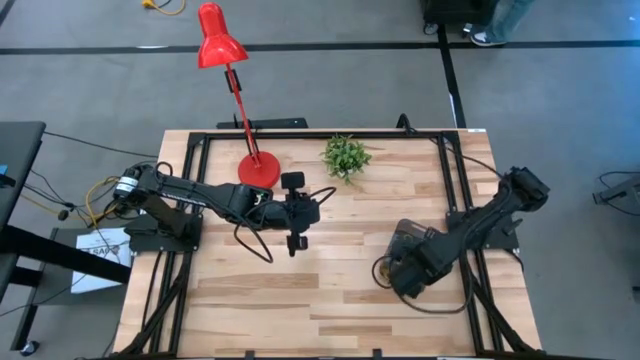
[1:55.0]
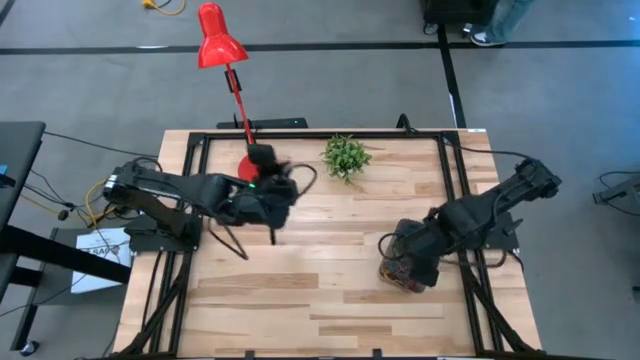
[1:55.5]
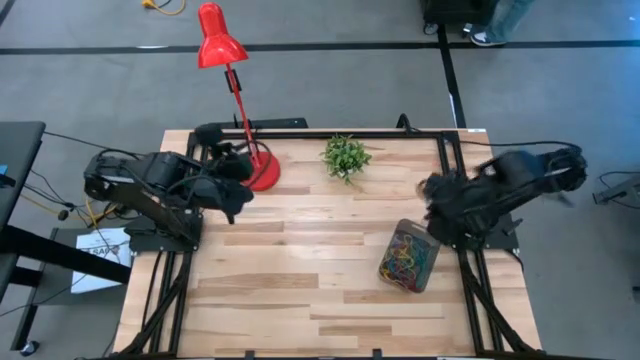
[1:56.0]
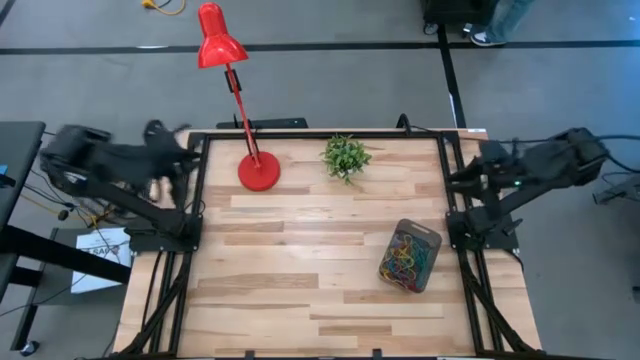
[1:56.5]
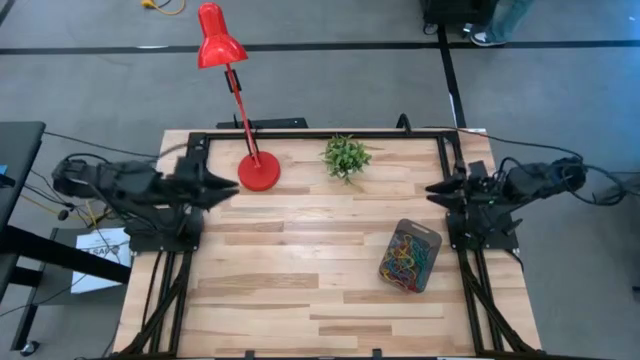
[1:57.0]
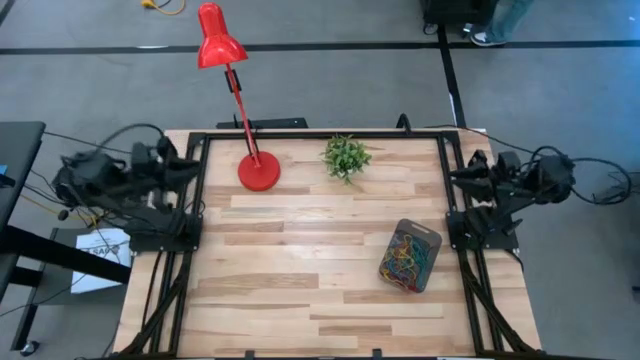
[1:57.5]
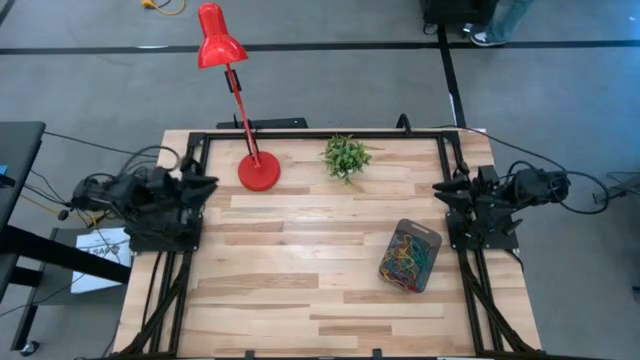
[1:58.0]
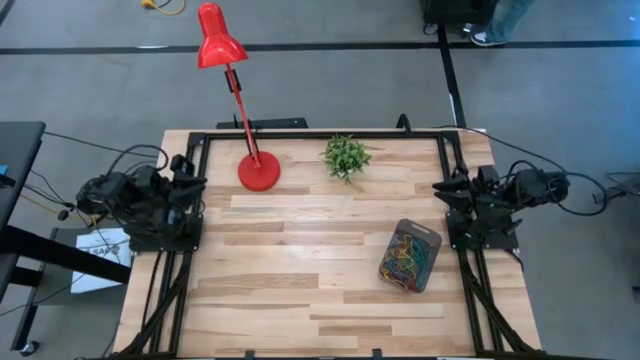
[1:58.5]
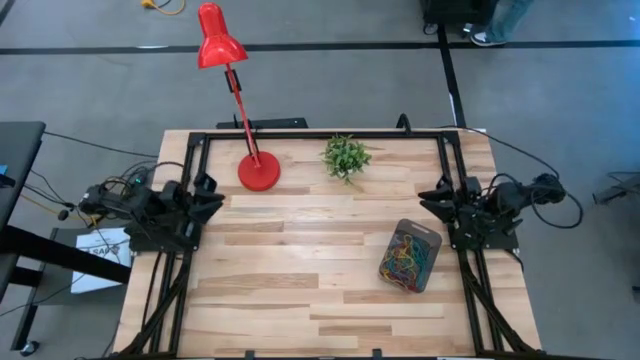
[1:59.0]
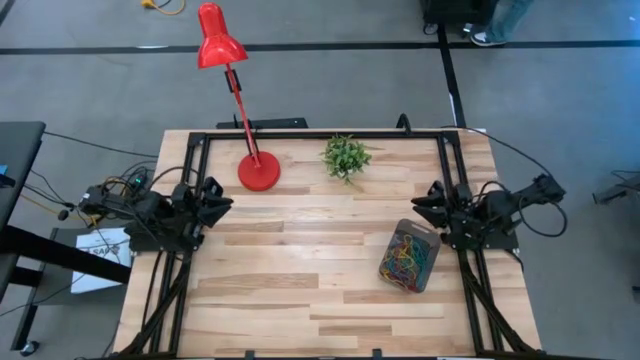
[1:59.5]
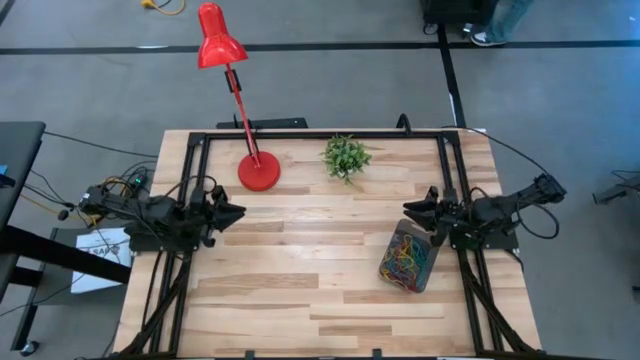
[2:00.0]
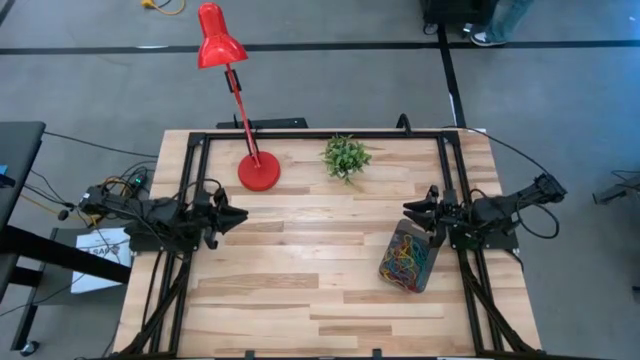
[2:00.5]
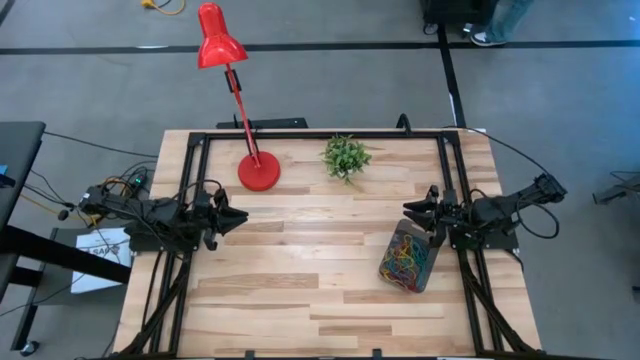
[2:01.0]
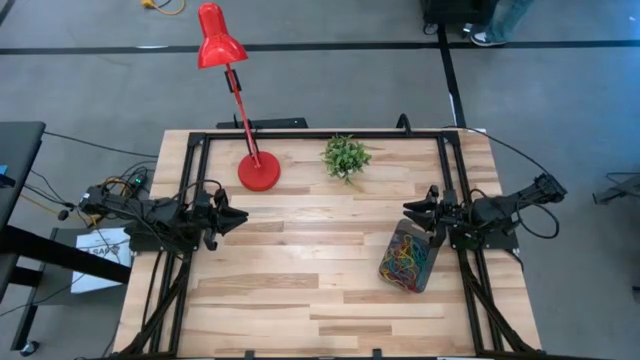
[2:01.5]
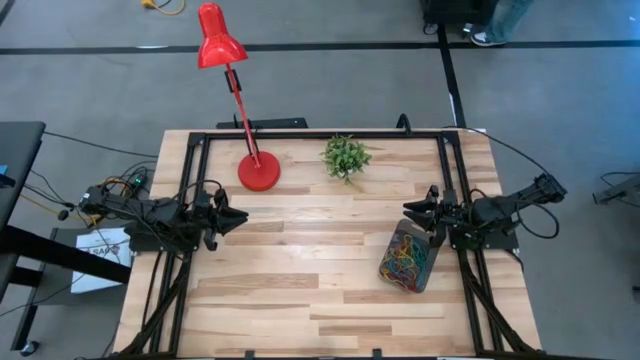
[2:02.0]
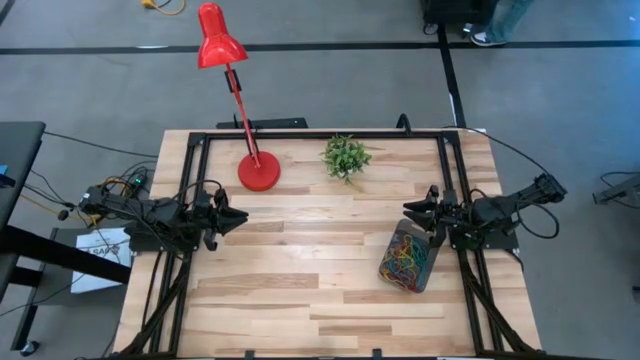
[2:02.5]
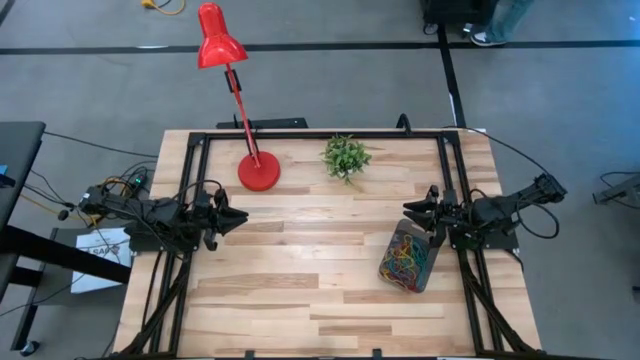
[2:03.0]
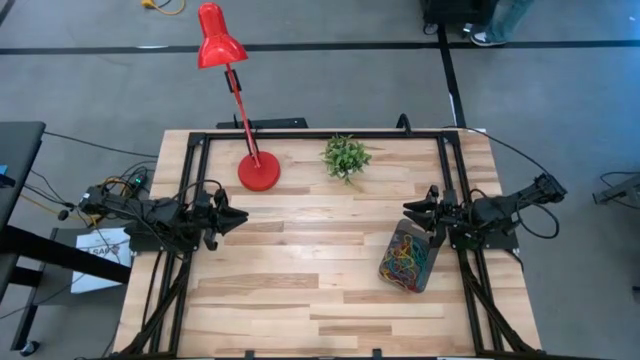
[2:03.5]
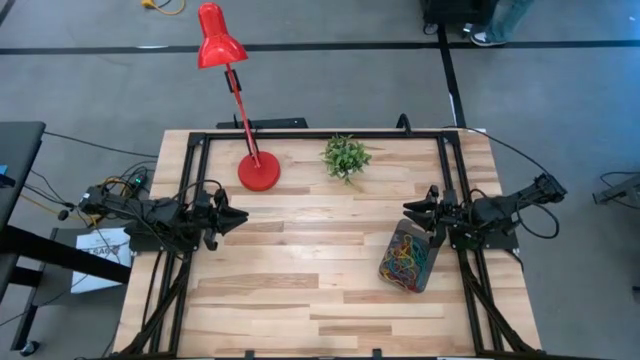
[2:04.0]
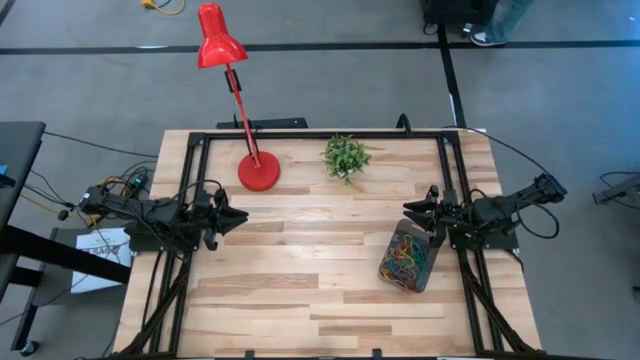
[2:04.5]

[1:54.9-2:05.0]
Task: Pick and place items into bin
Return to Home Position

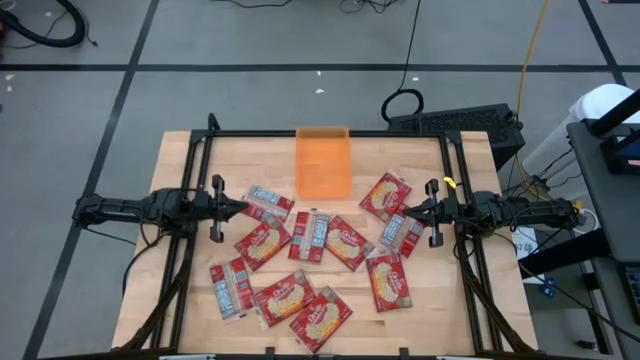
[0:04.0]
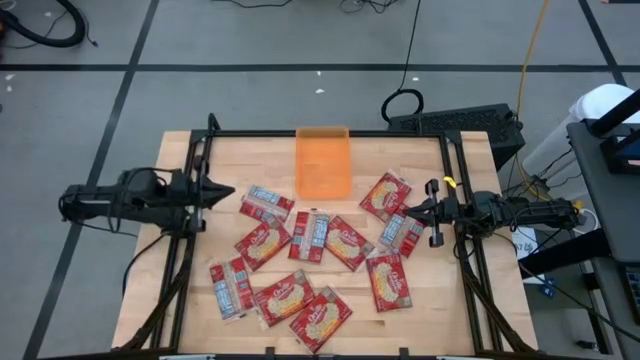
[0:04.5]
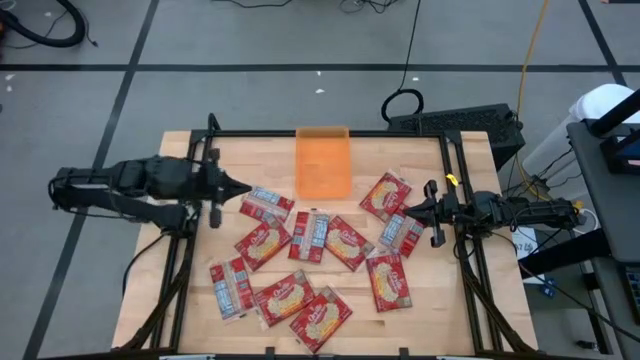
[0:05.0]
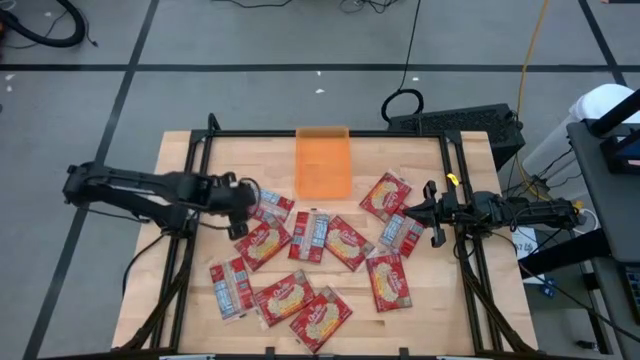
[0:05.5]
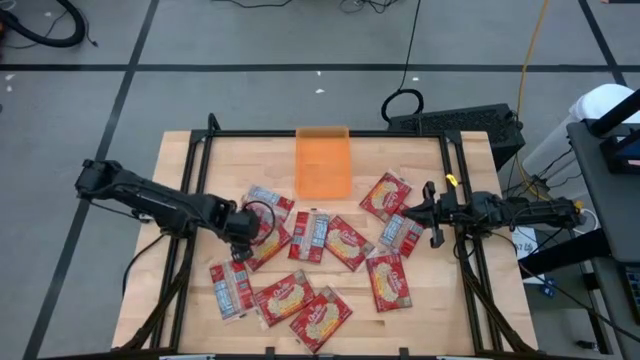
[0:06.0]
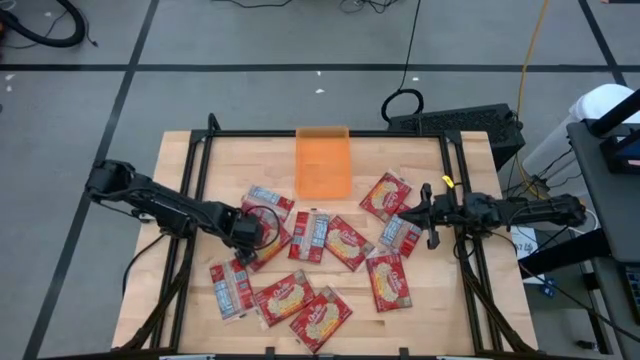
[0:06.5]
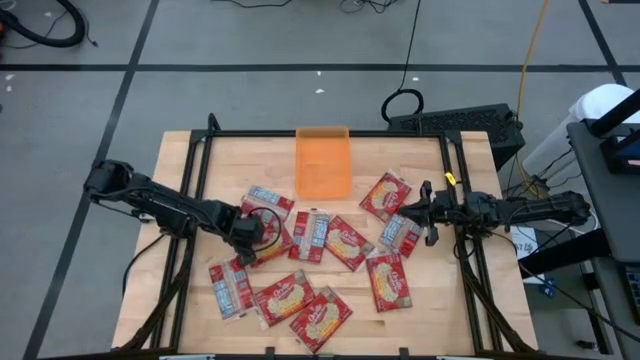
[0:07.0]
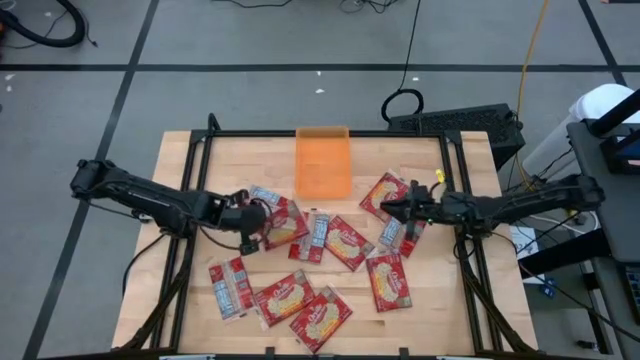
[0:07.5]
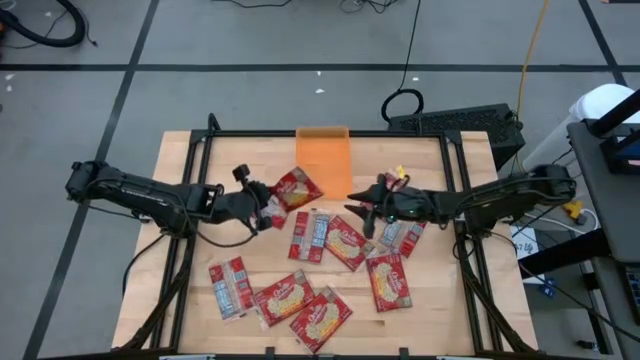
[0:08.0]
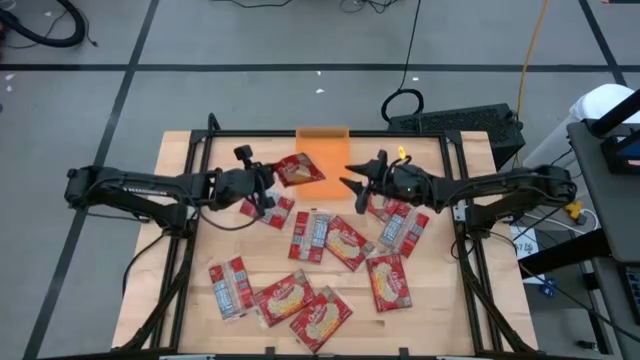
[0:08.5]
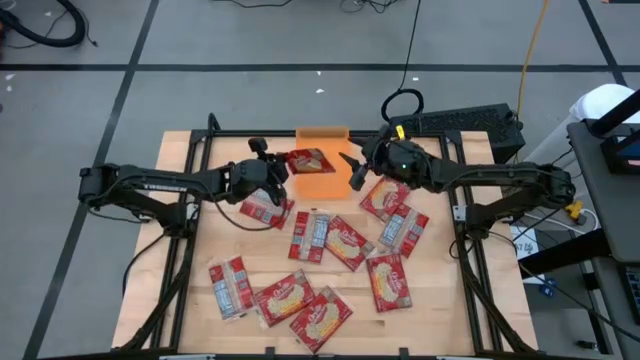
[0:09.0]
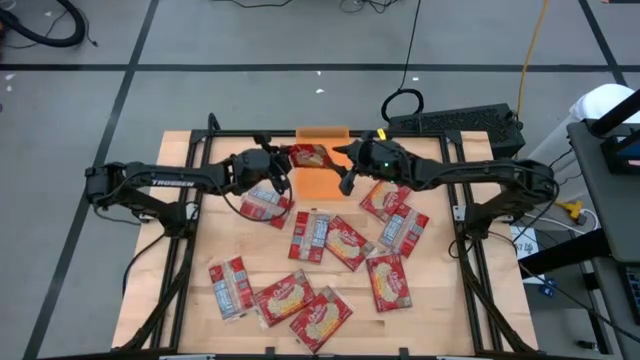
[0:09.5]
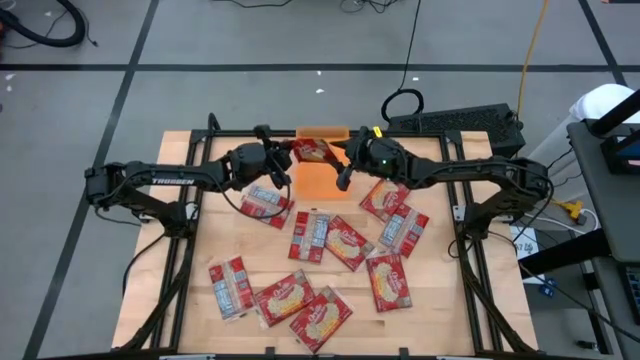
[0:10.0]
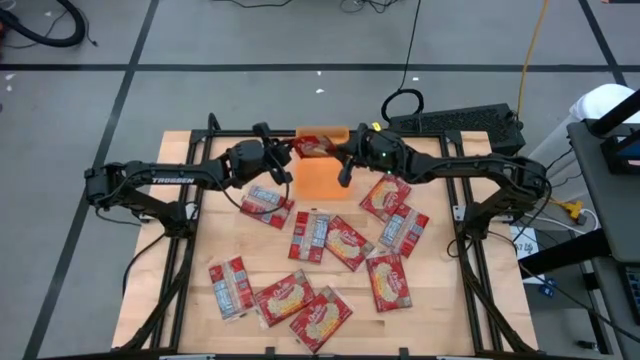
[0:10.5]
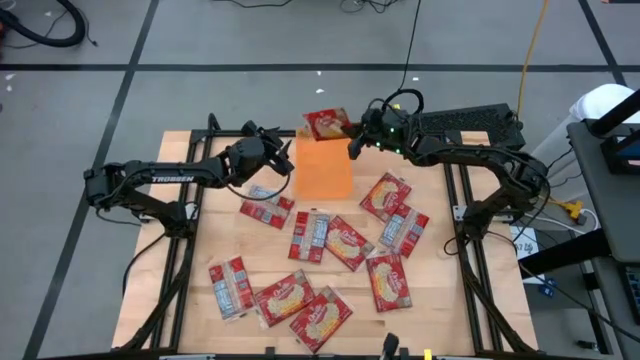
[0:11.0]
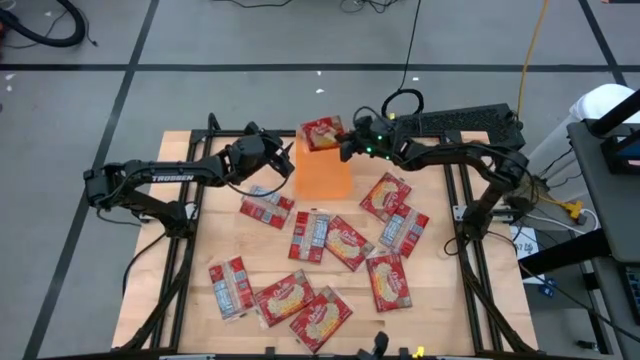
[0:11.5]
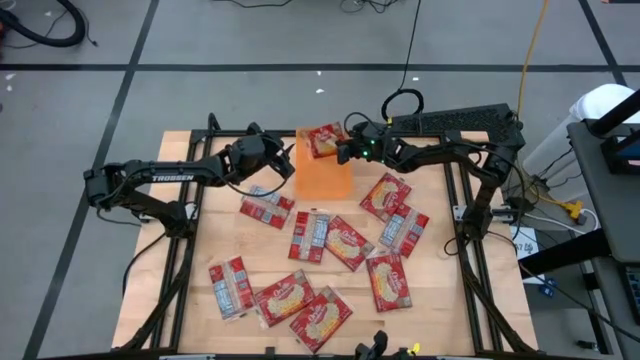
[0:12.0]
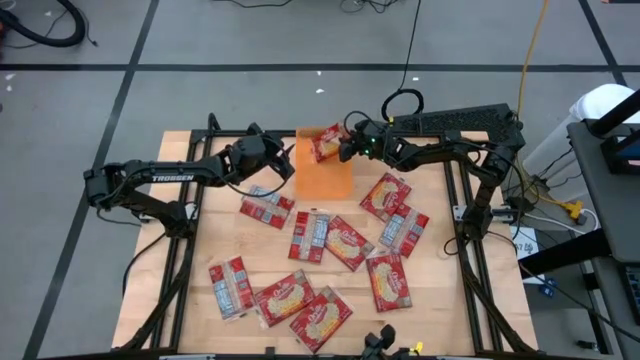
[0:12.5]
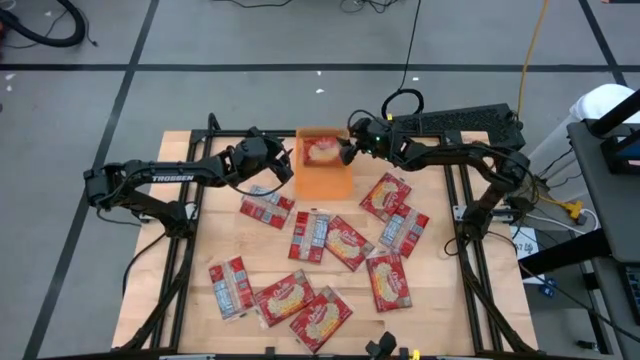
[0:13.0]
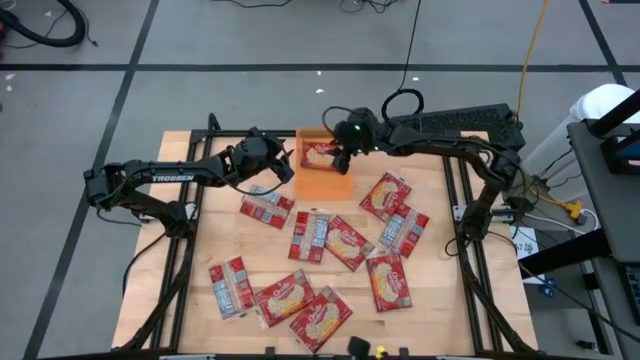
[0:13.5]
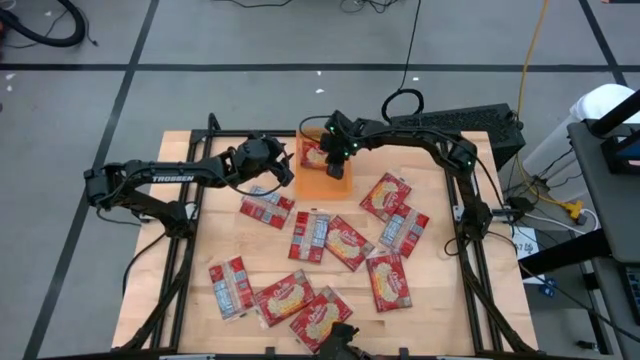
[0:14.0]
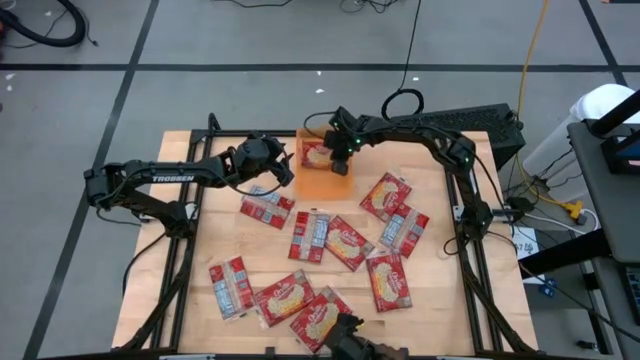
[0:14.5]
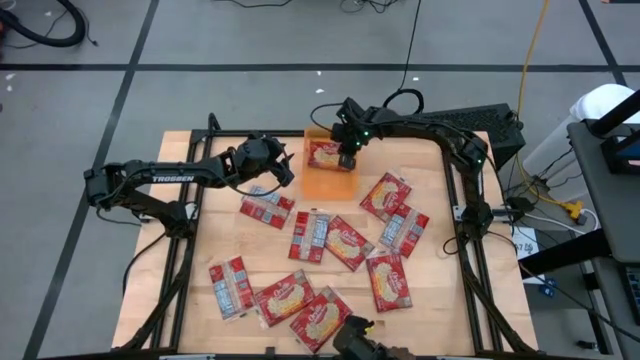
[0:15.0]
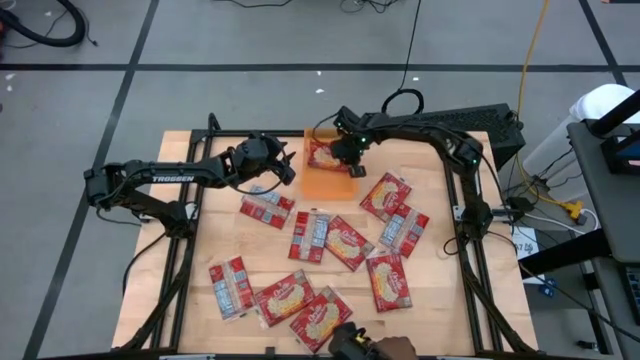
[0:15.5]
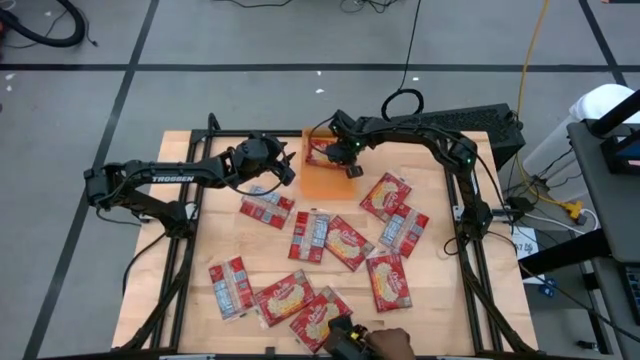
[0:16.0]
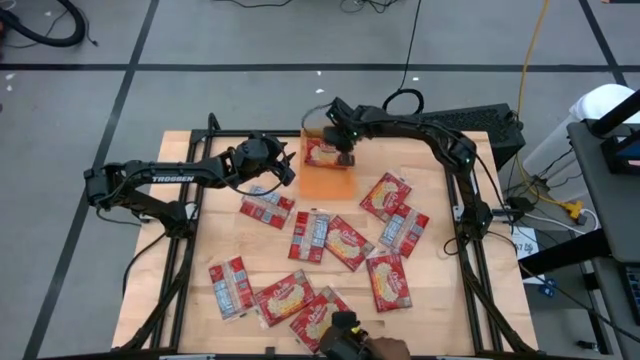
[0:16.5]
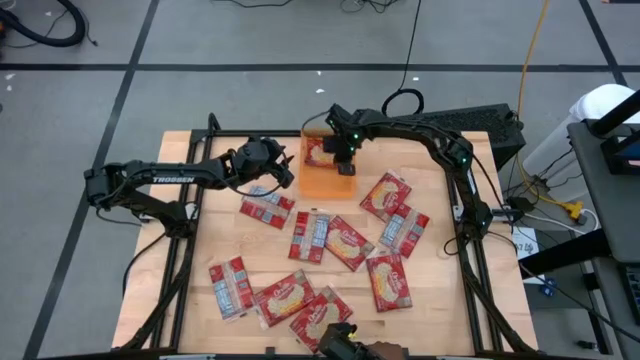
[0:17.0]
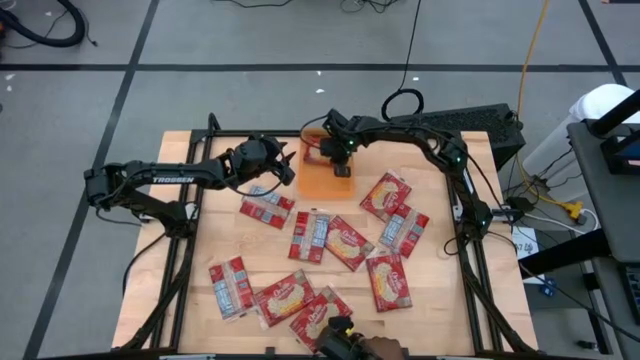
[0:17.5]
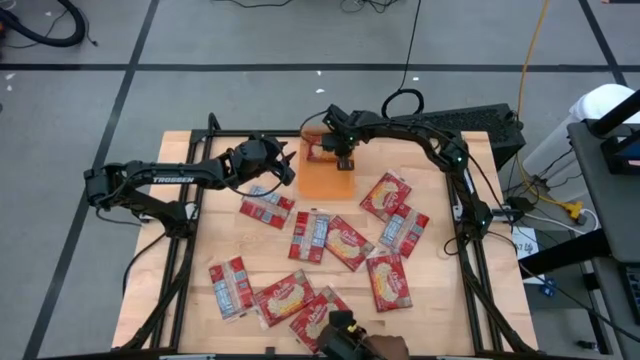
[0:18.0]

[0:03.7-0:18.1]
Task: Sort popcorn bags into baskets
Put the red popcorn bag into the orange bin
